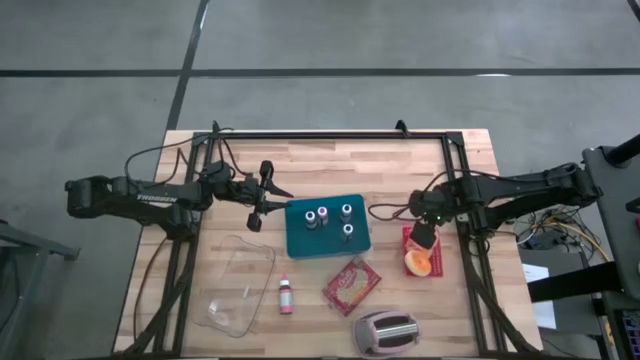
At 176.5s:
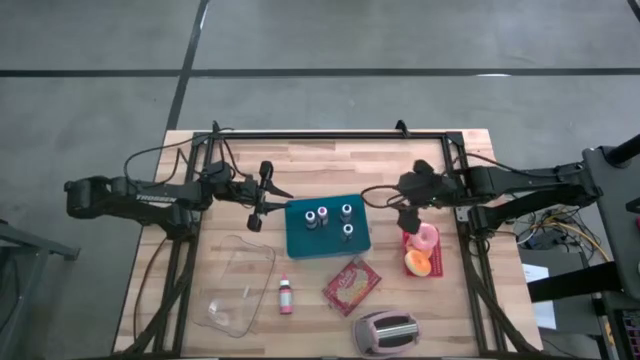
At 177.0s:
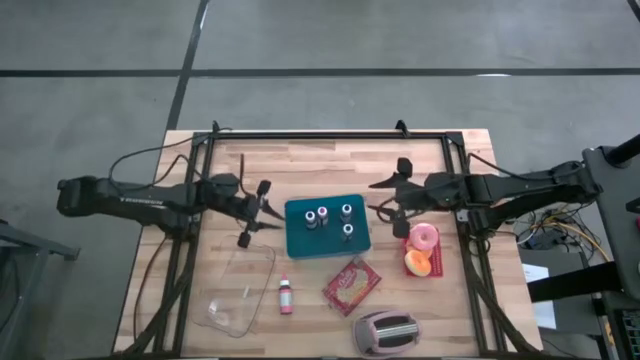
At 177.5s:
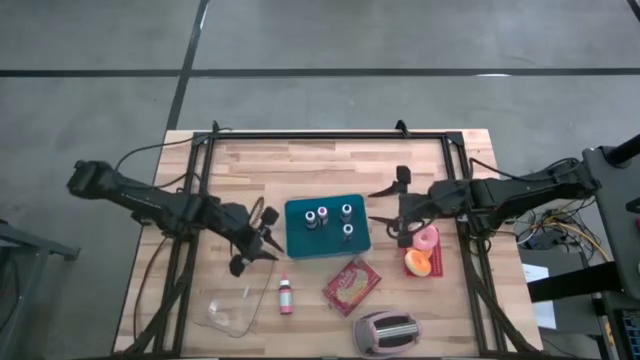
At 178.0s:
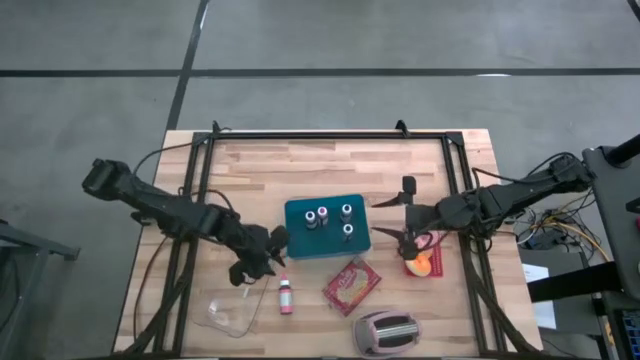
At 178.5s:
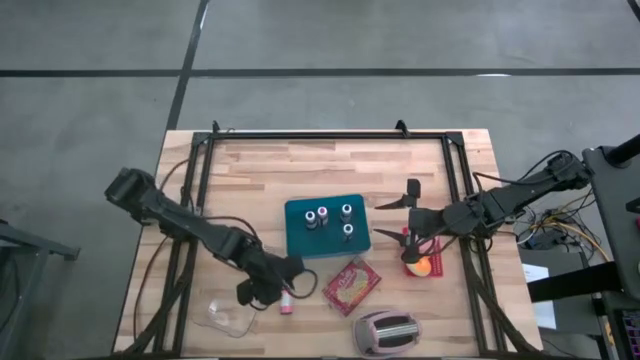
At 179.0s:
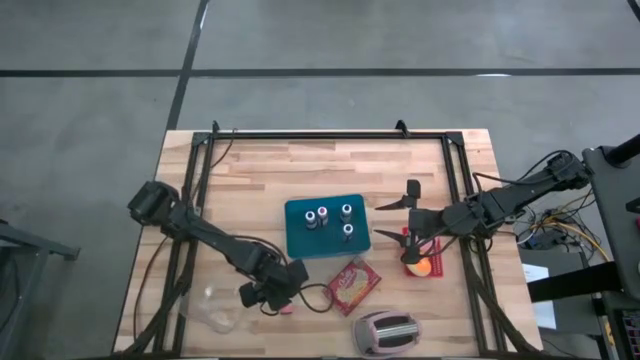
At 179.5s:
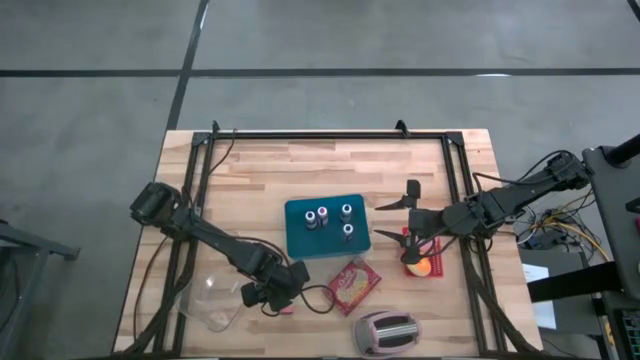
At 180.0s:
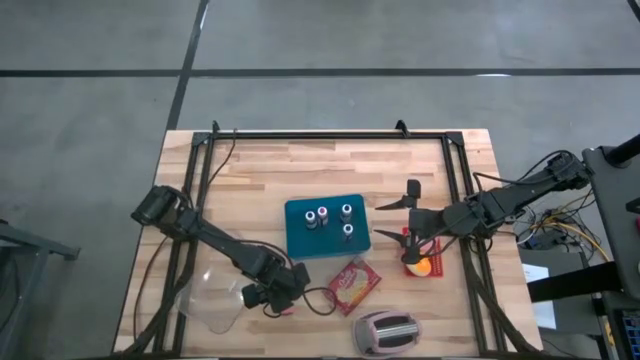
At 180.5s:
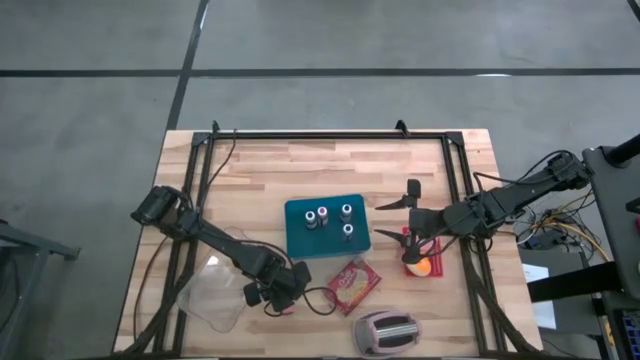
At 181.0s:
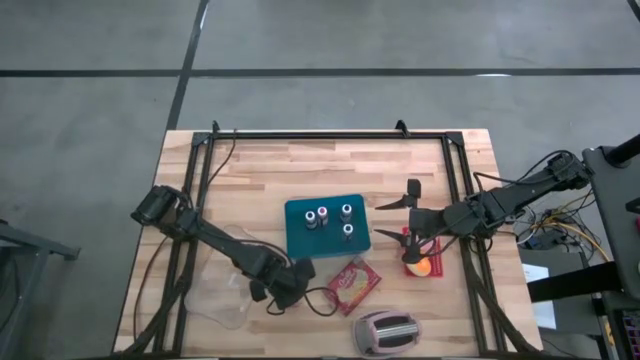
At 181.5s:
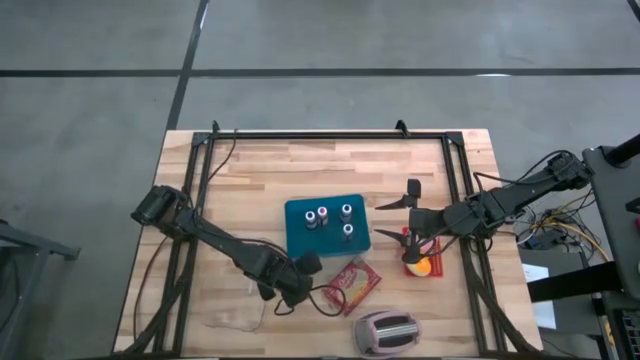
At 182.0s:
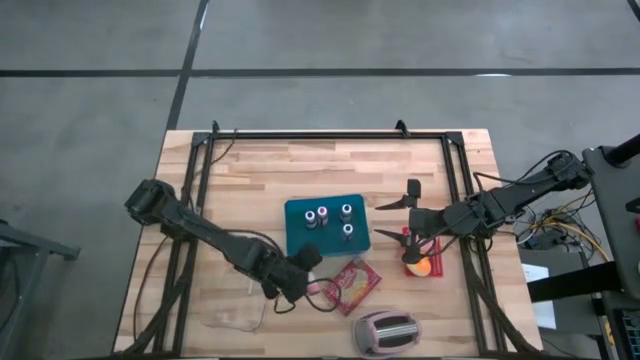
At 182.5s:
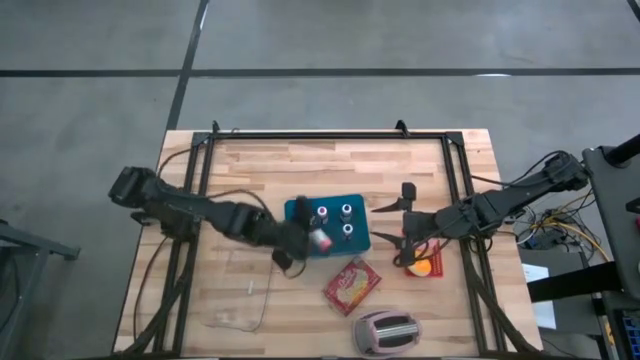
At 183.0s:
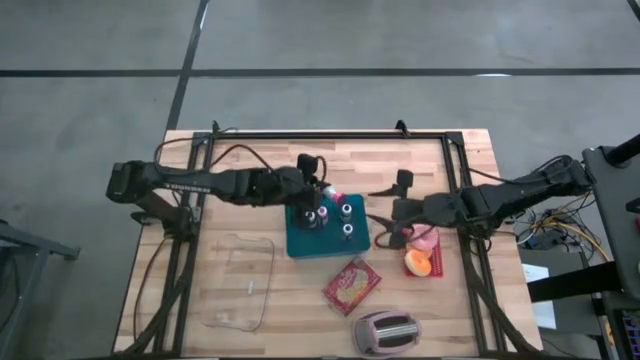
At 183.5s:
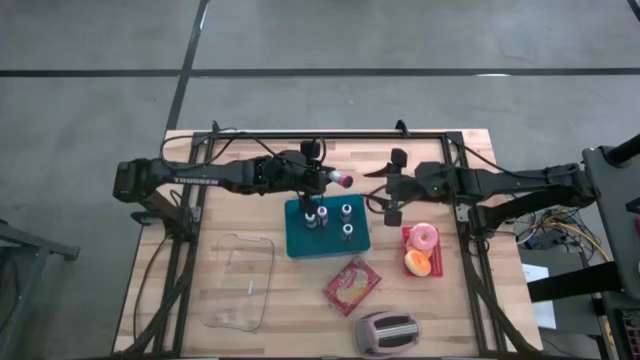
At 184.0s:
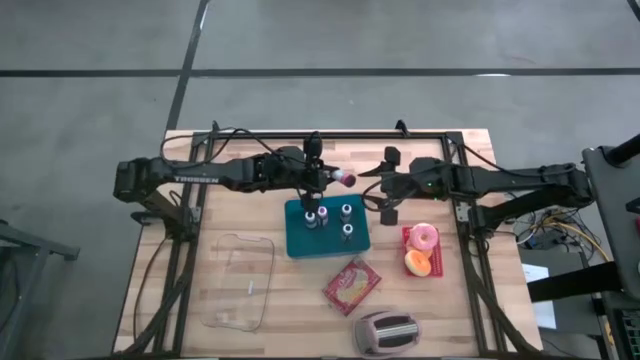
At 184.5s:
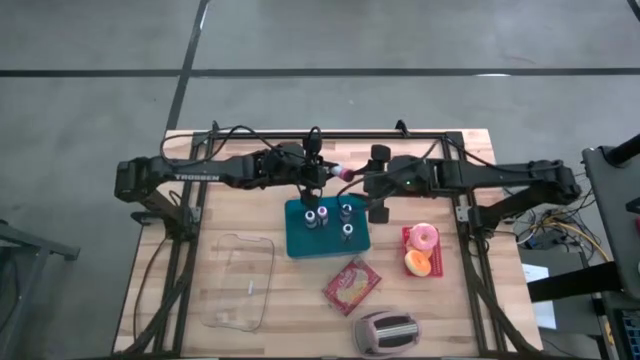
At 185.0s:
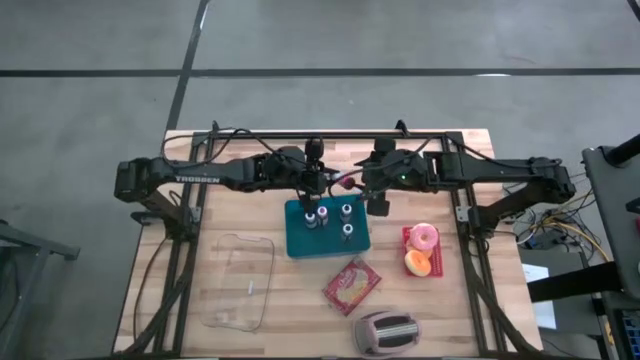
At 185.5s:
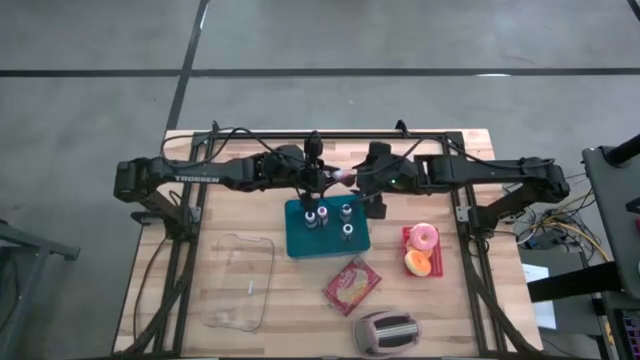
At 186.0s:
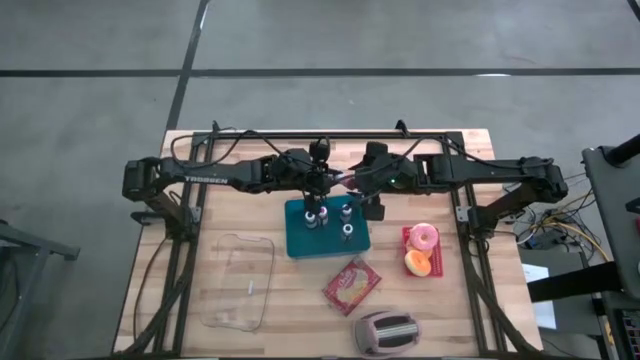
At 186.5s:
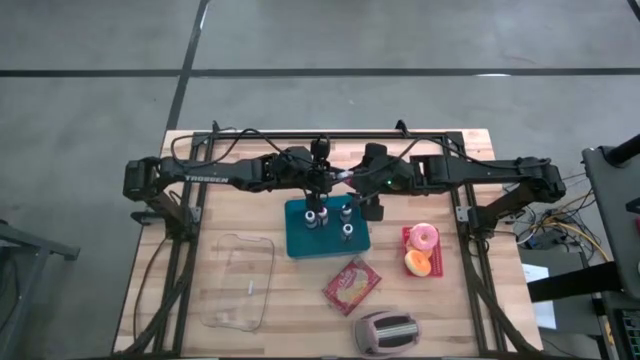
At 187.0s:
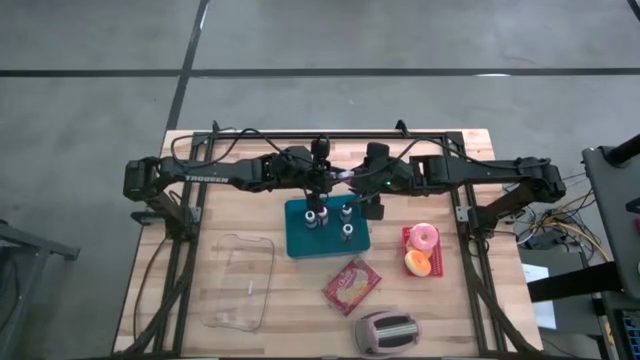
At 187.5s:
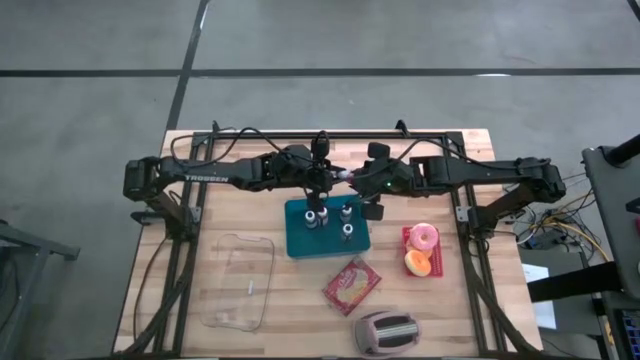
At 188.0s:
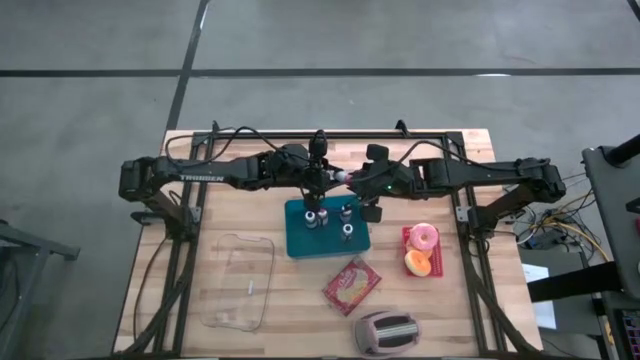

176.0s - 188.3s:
Task: Pick & Place Food Item
Put the pink food coloring bottle into the blue bin

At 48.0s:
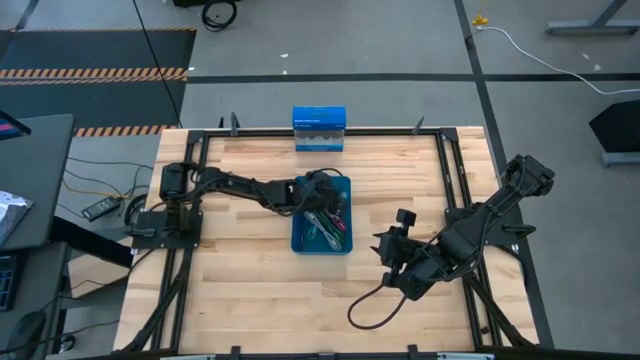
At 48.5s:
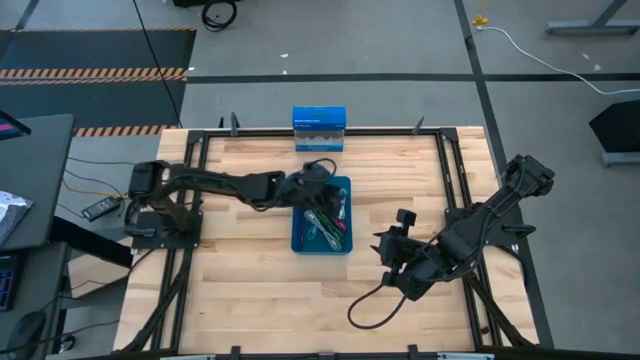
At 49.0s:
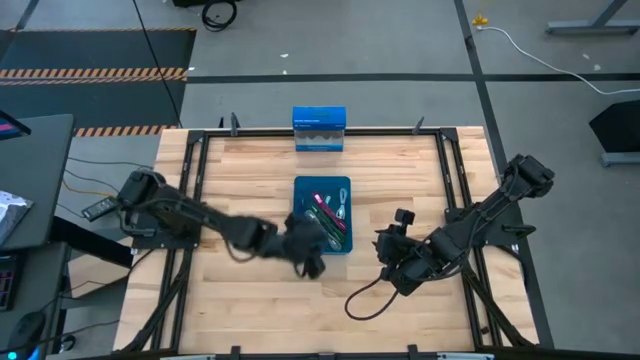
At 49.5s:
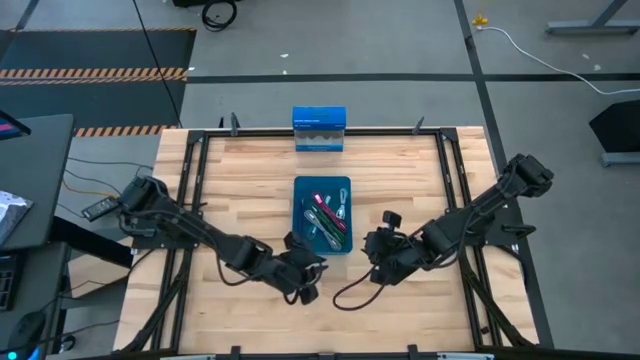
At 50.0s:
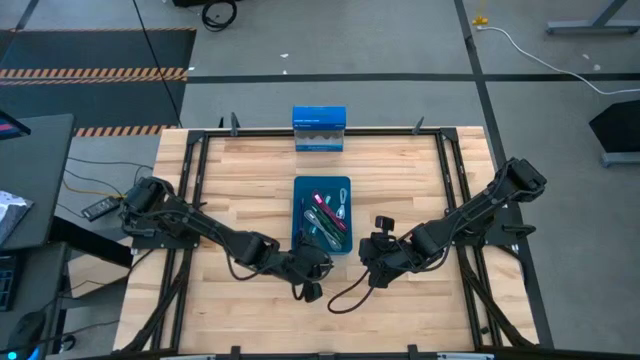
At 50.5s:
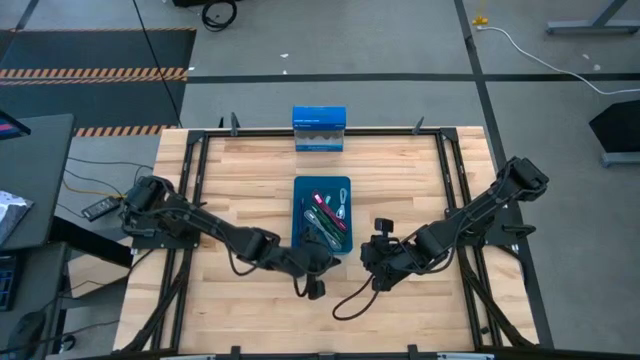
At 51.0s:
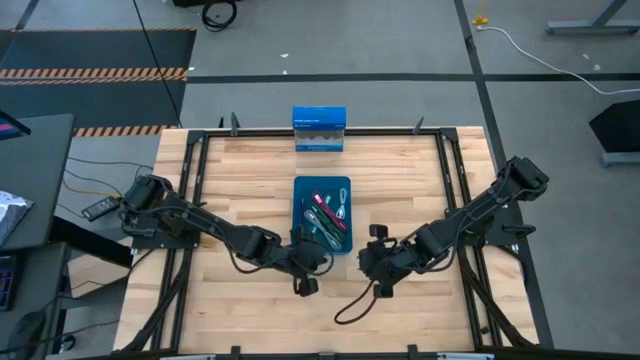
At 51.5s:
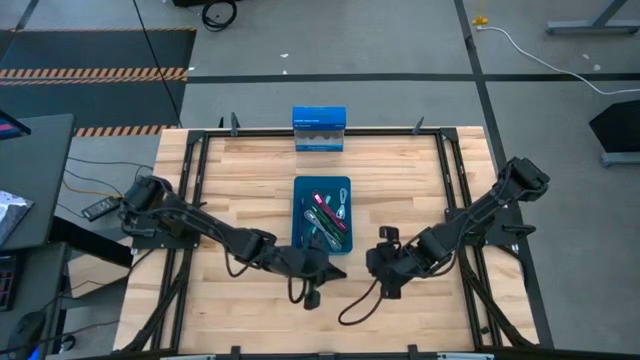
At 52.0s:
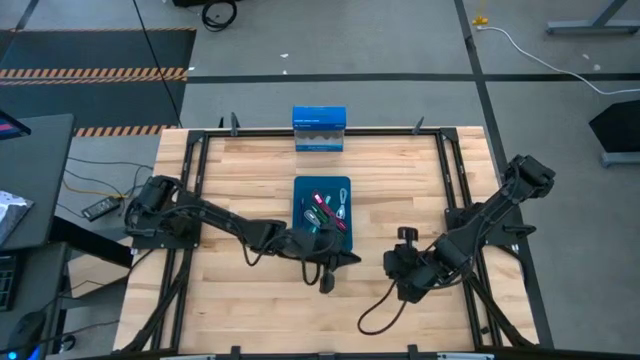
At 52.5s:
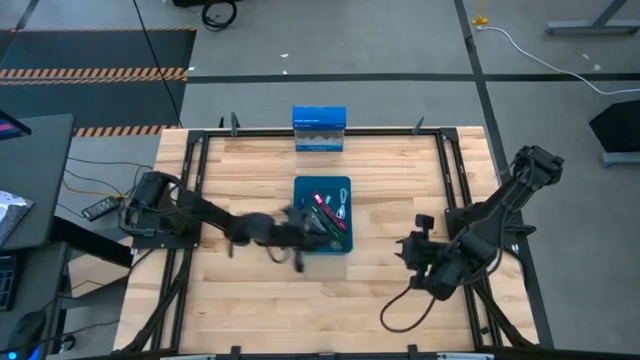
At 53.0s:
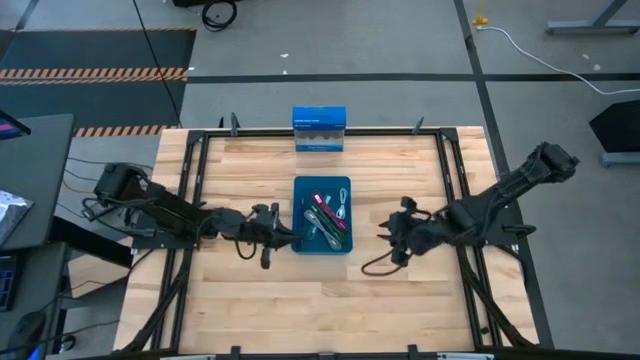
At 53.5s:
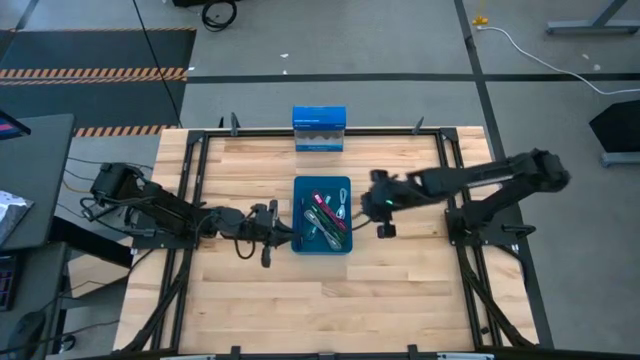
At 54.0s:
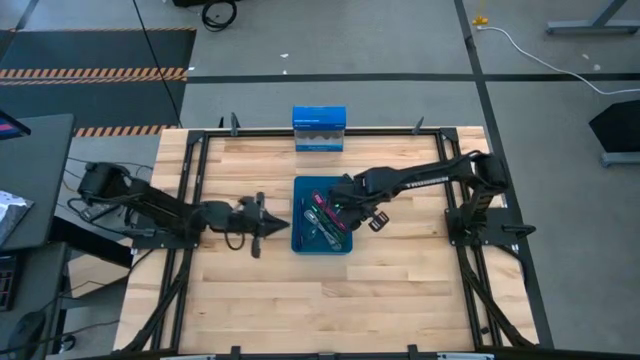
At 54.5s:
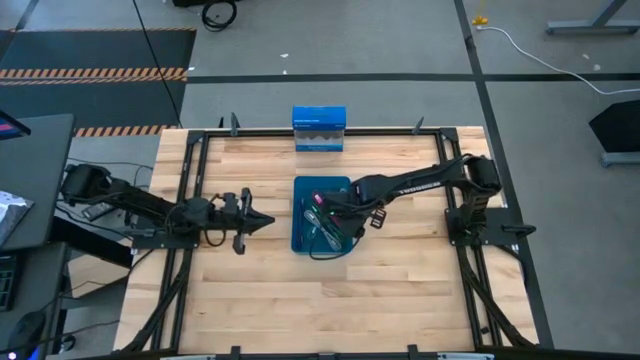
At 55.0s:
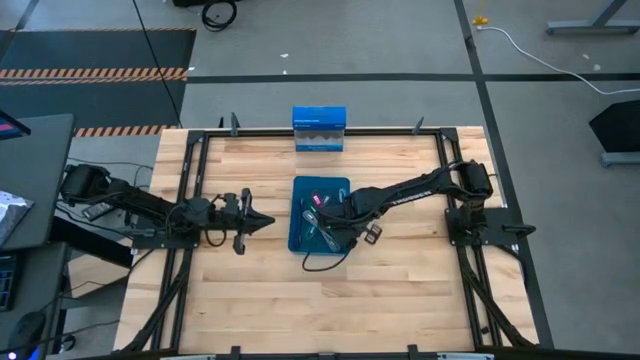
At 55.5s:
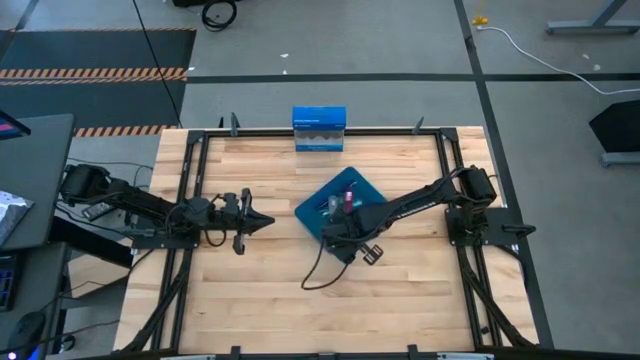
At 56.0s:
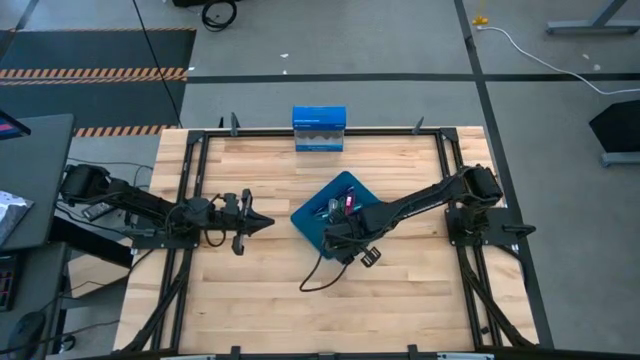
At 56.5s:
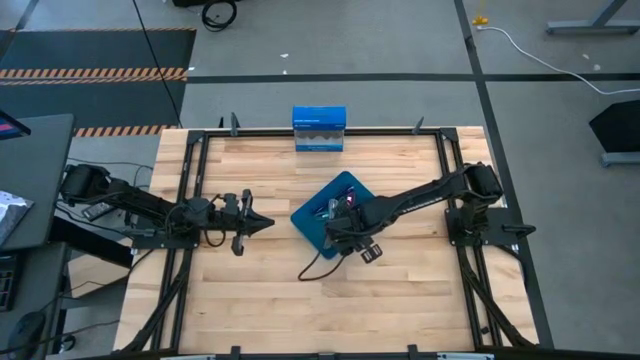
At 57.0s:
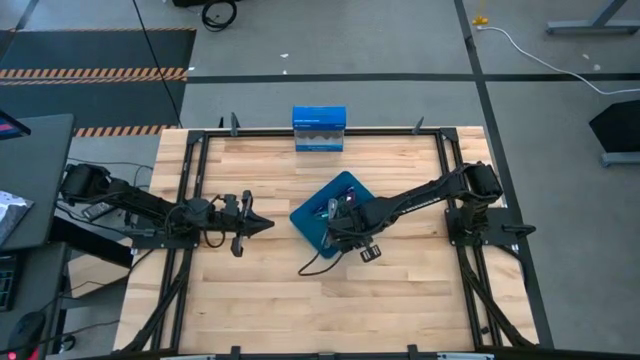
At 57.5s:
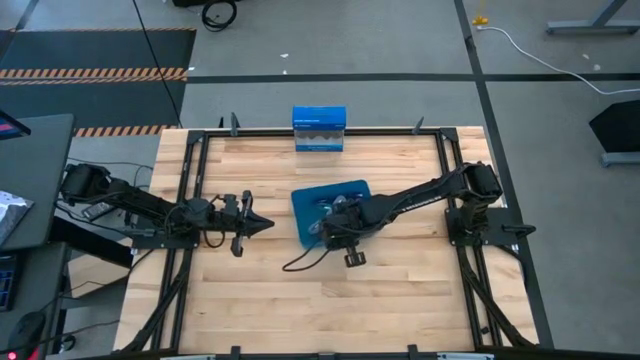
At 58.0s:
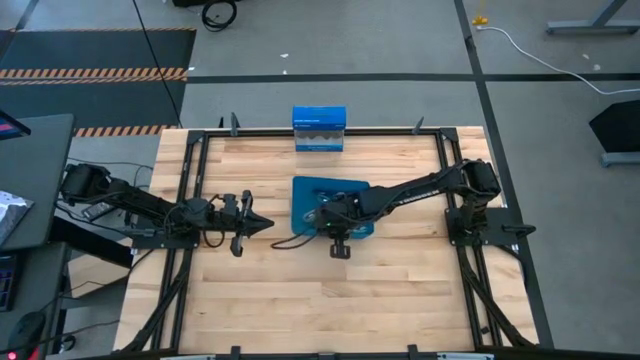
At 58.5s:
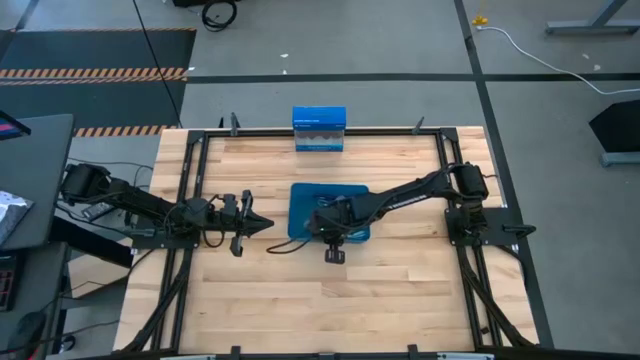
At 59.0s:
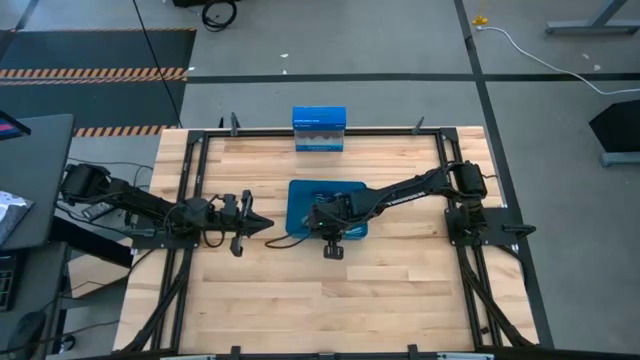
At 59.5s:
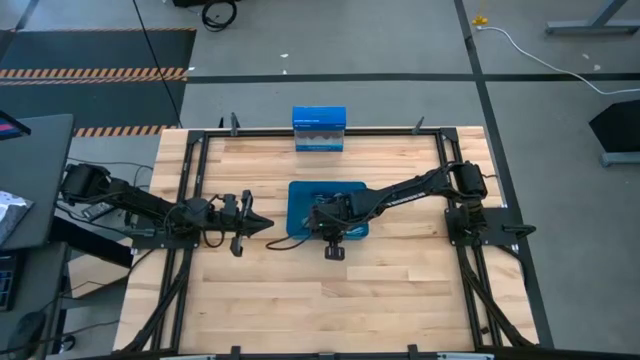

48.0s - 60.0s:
Task: Pick and place USB-C Cables
Adjust the blue bin
